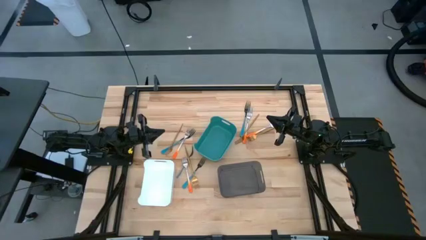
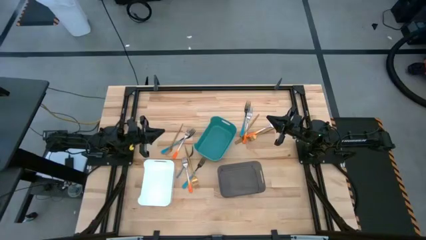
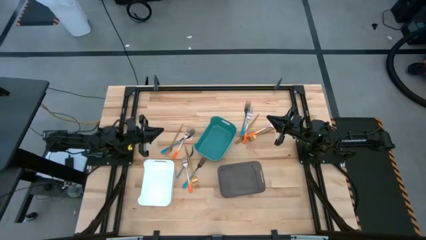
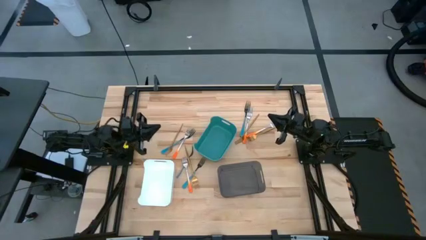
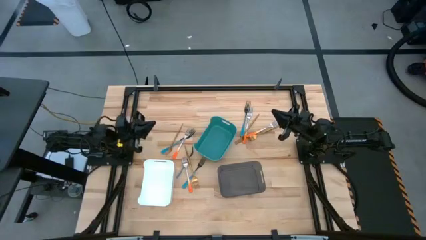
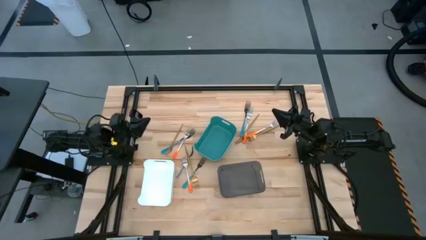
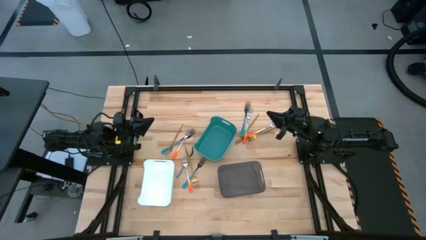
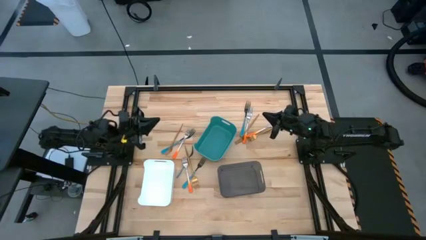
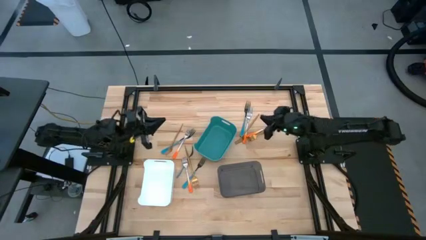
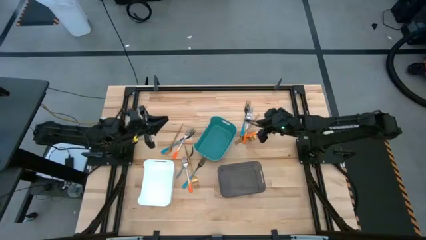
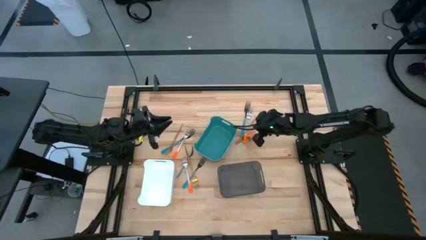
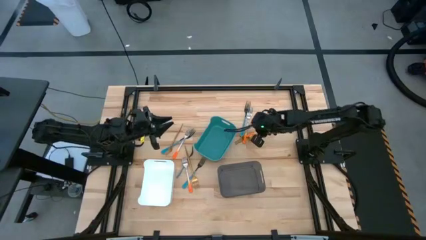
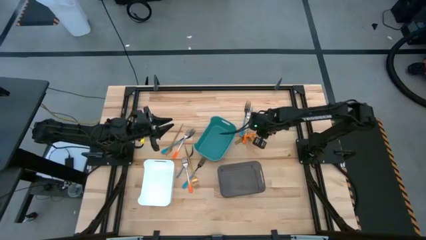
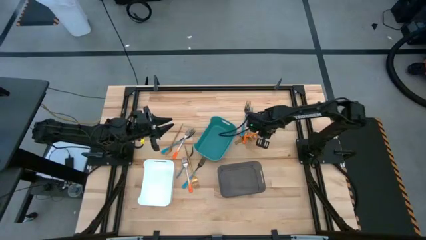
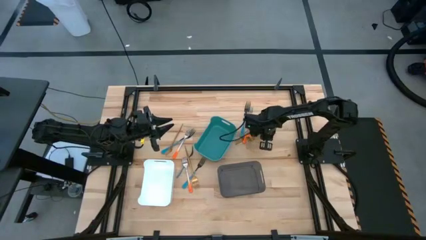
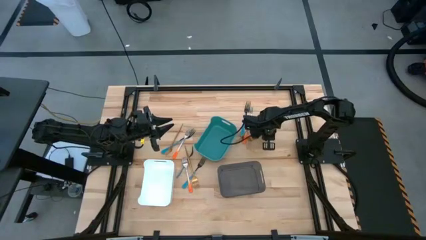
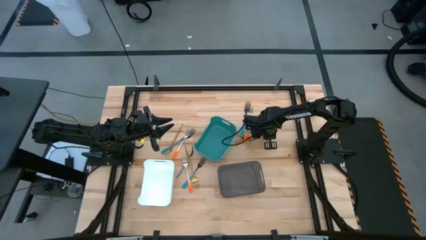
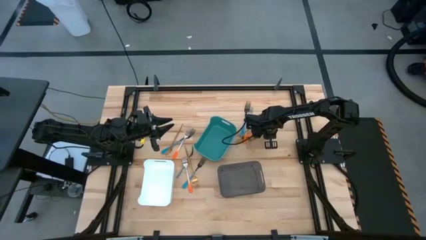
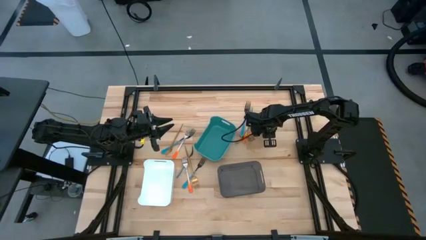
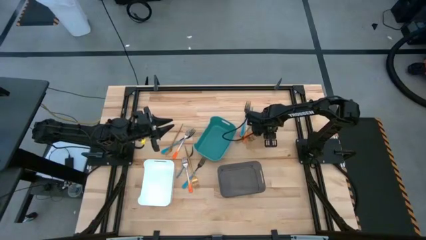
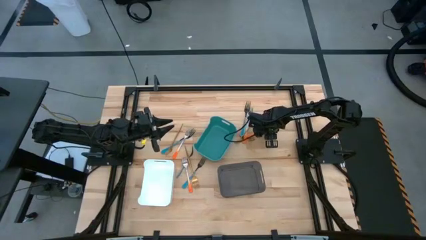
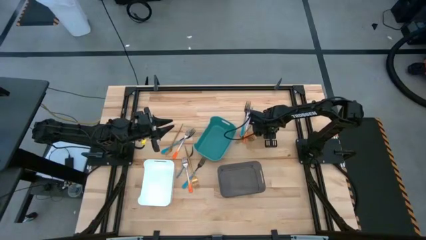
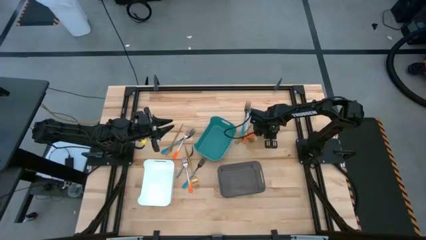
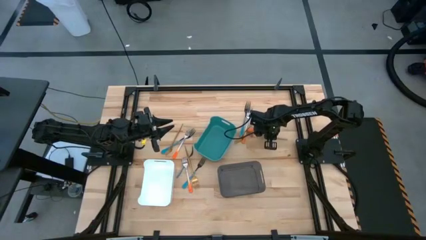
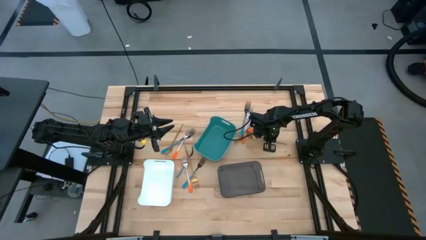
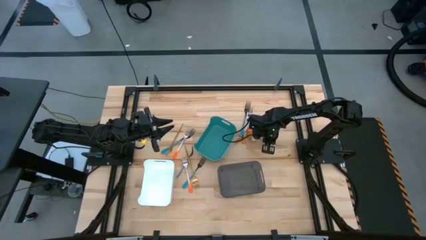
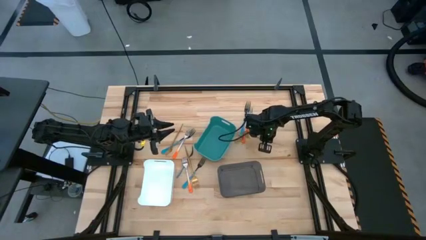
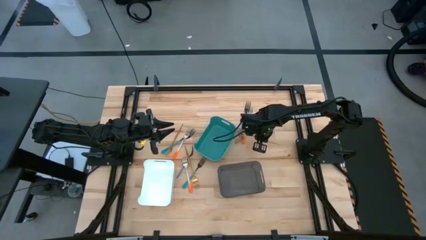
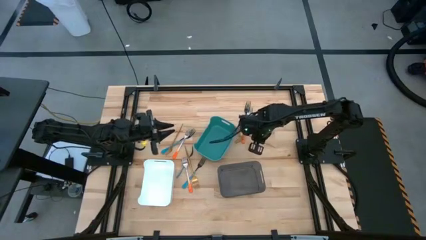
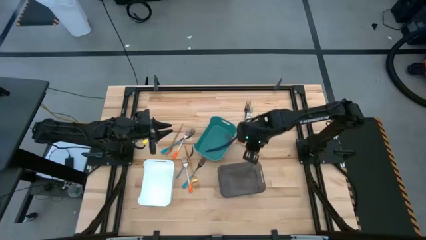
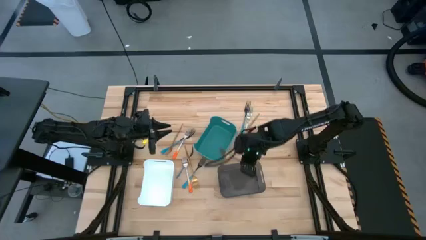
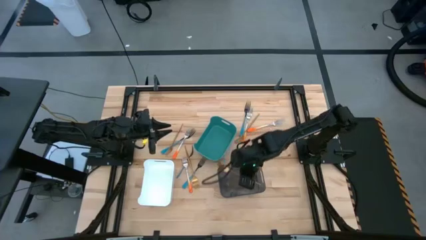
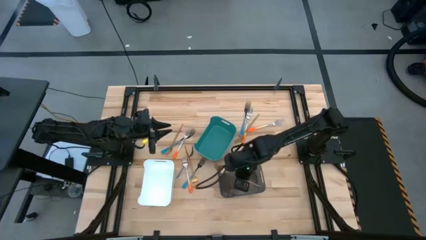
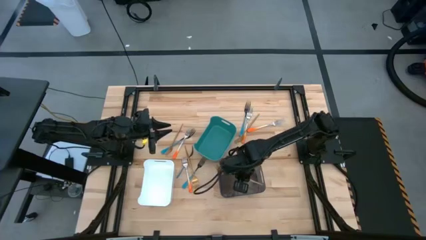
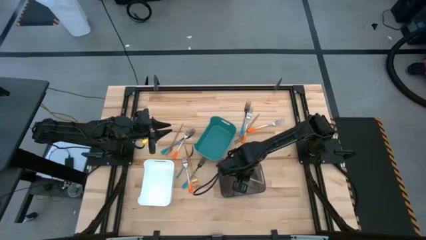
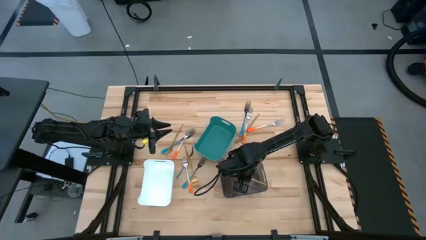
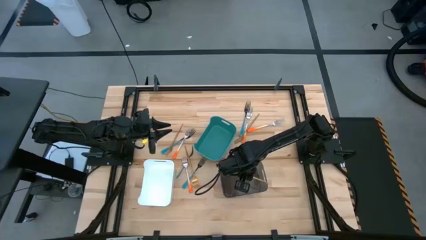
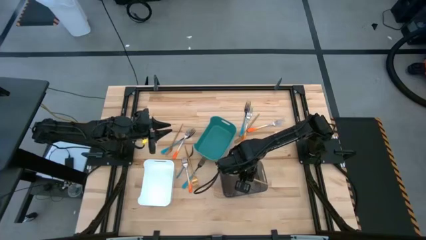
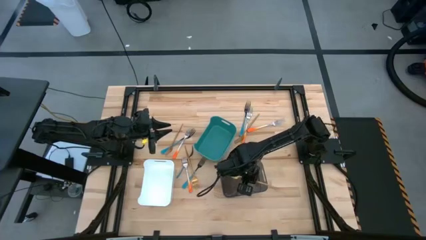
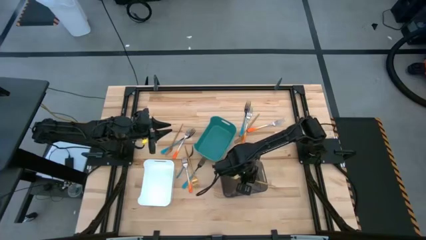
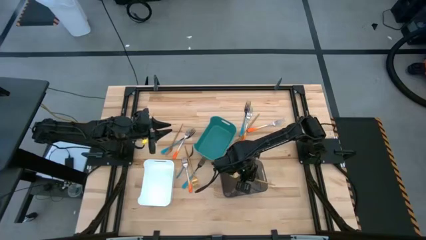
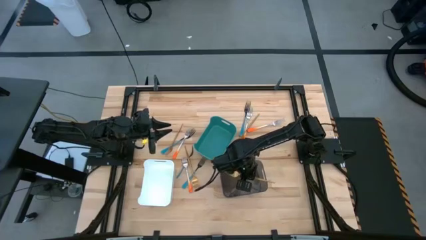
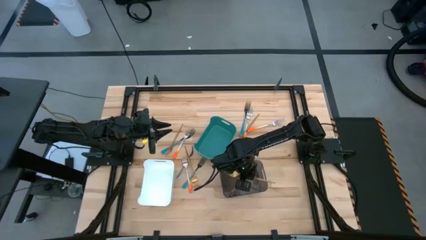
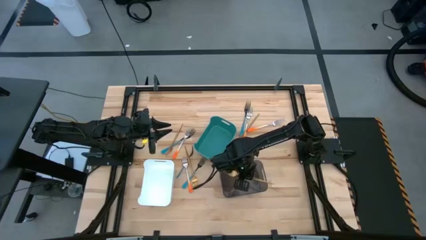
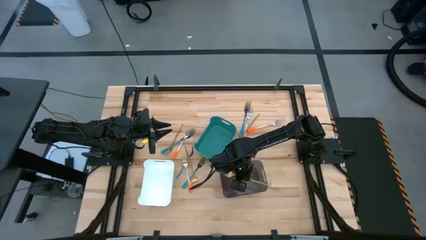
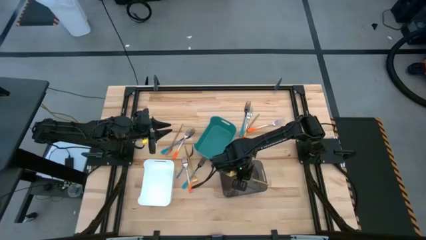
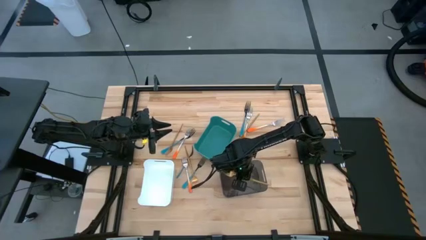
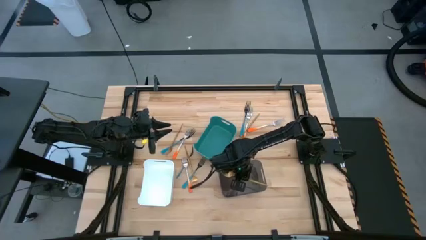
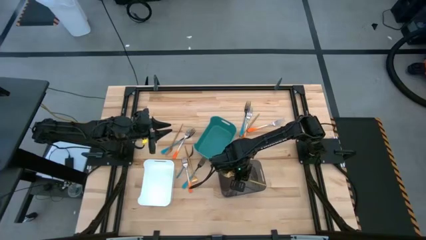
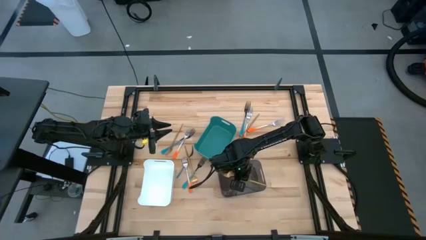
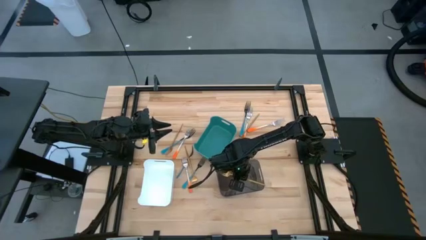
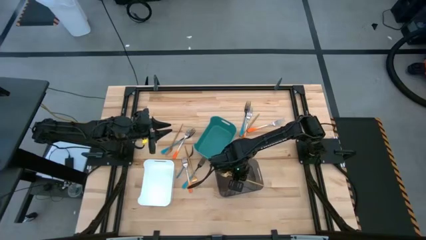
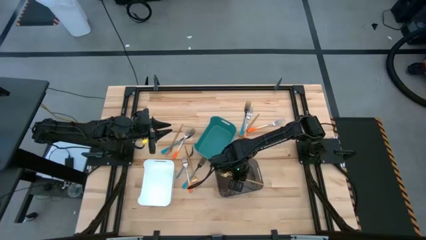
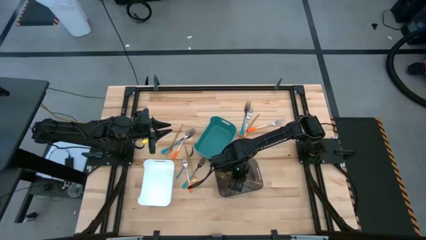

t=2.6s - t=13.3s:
Task: Sort silverware by color (type)
Put the gold fork into the black transparent bin

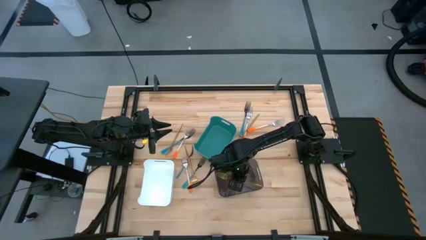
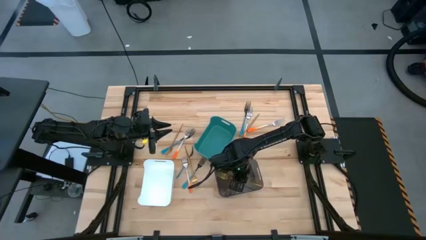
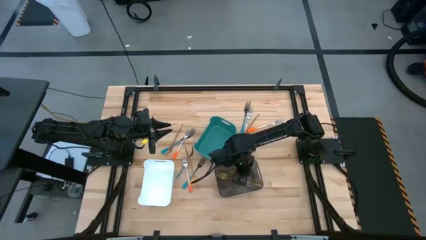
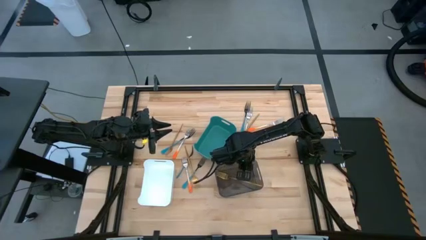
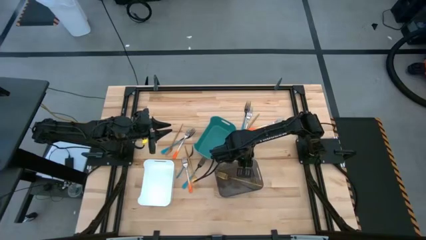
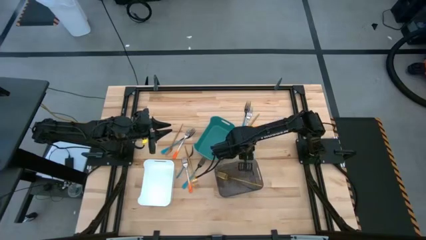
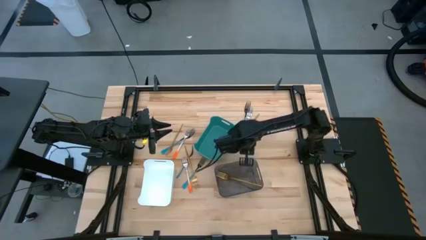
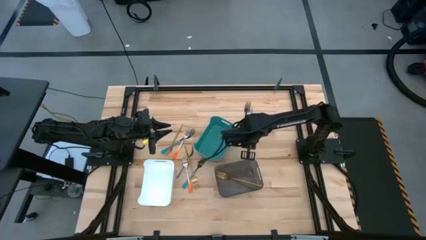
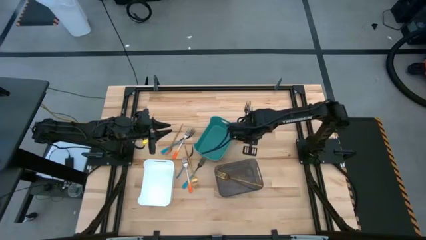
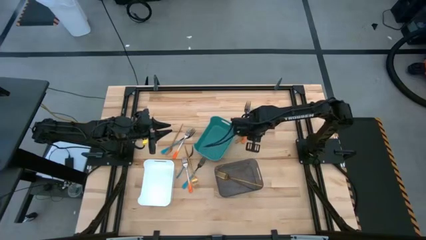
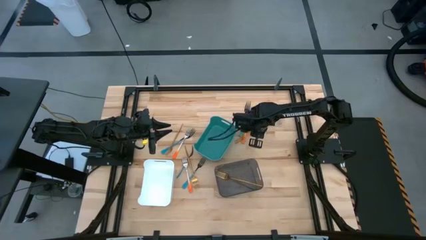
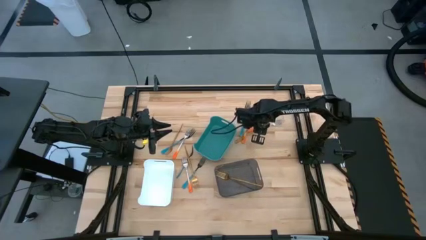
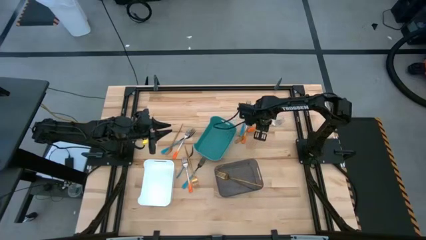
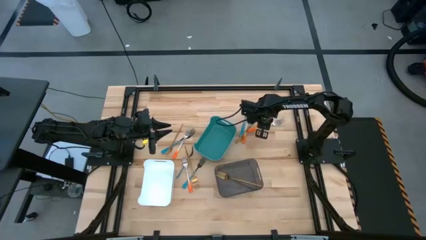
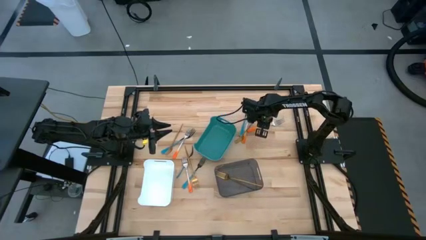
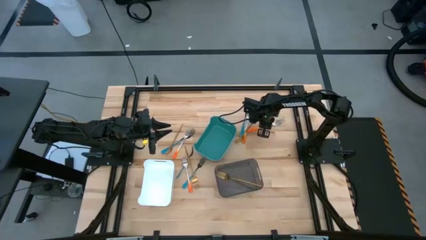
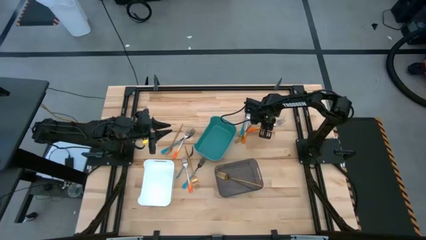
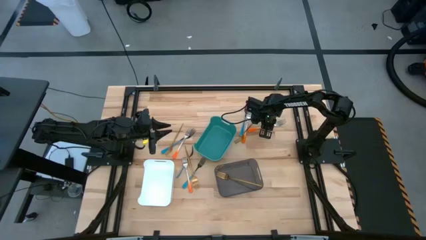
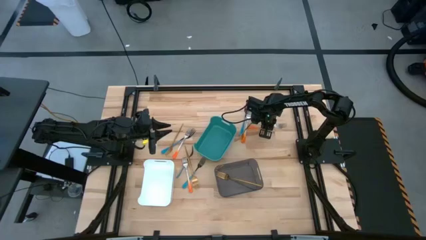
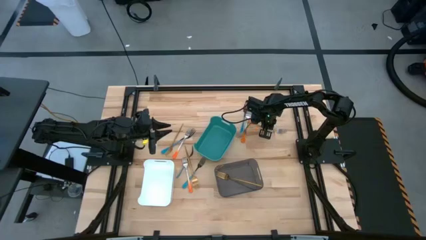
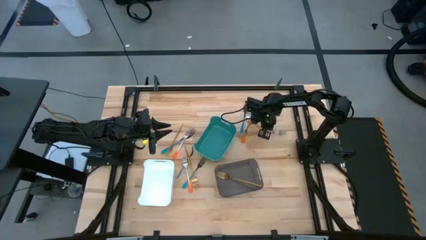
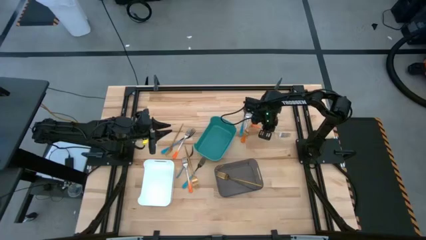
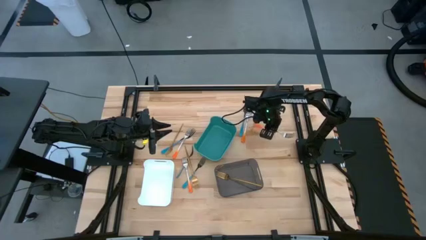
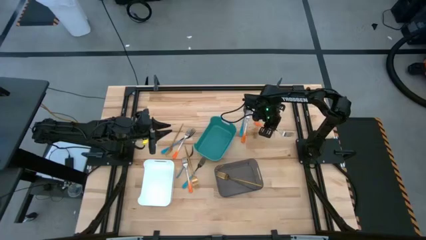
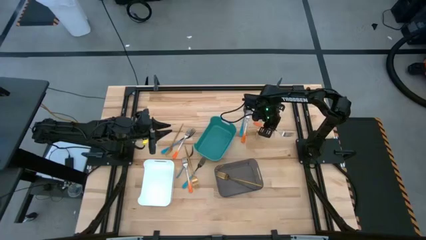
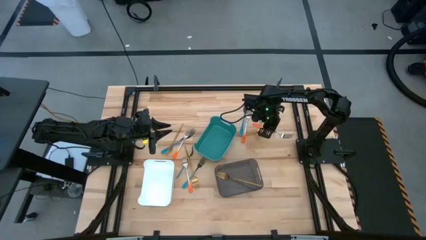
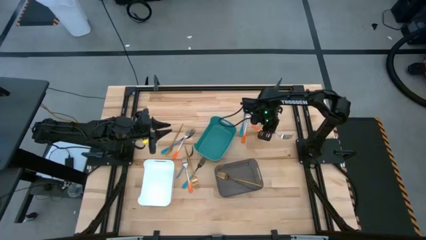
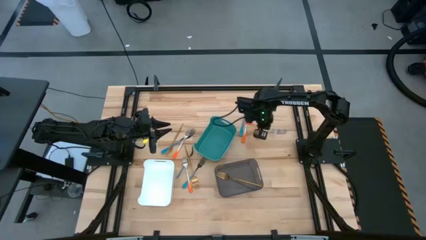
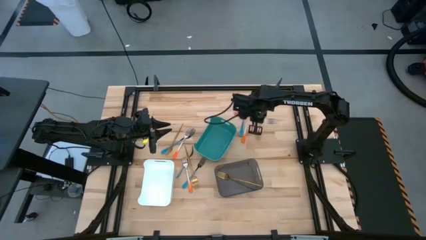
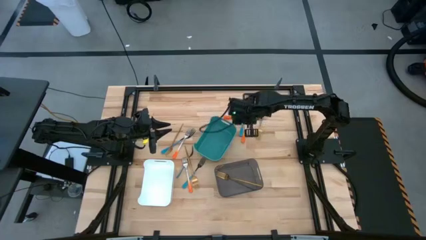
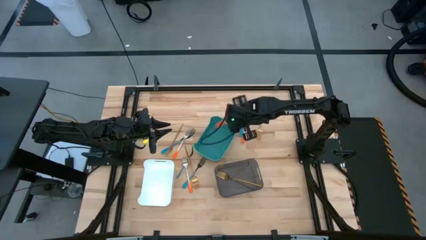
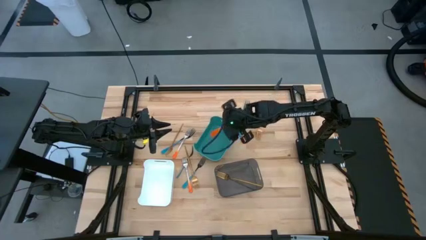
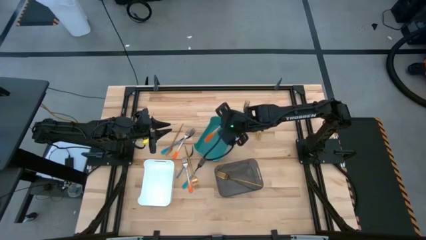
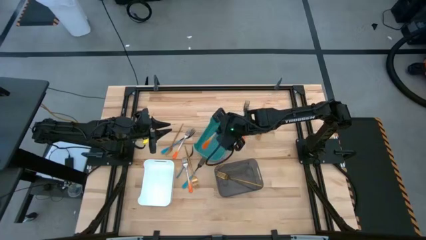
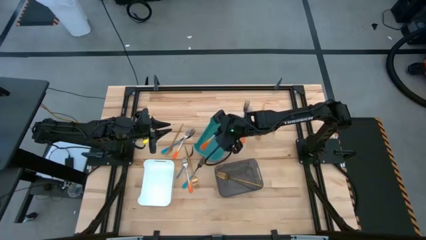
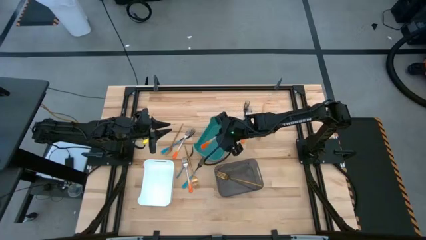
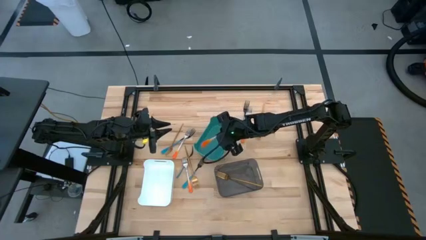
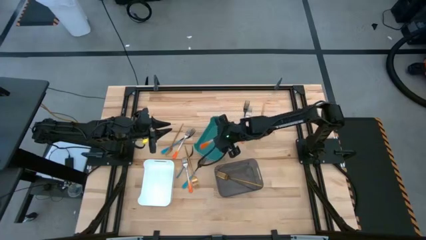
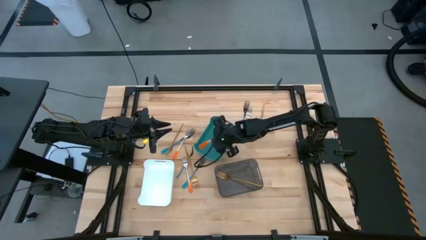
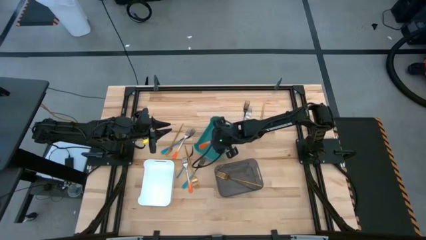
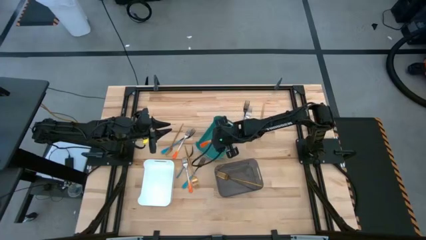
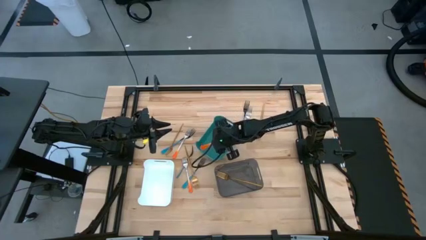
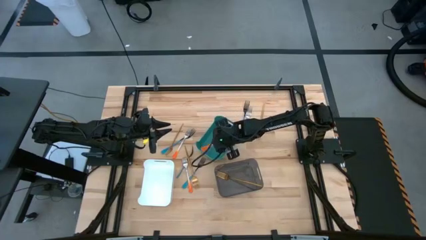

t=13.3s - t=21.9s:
Put the orange silver fork into the blue bin
